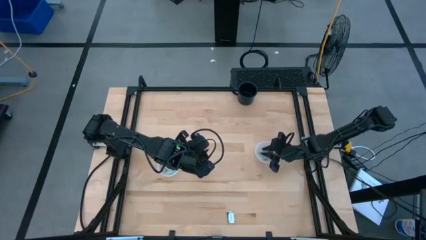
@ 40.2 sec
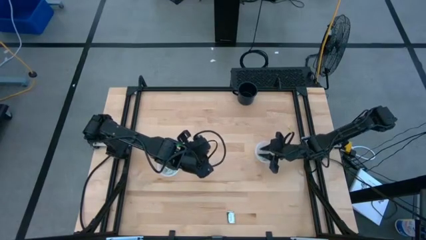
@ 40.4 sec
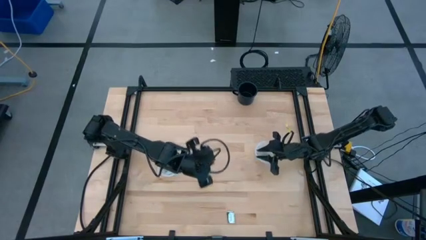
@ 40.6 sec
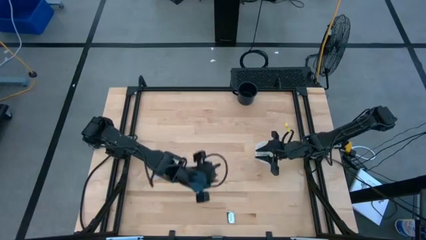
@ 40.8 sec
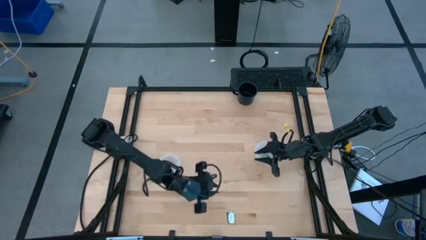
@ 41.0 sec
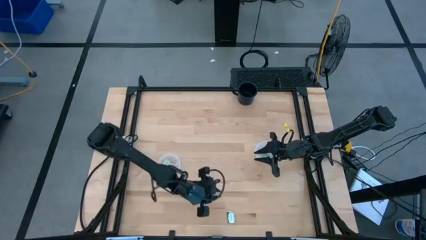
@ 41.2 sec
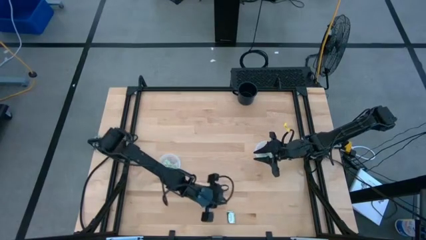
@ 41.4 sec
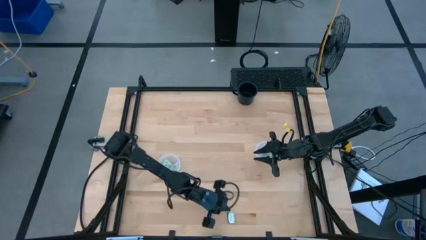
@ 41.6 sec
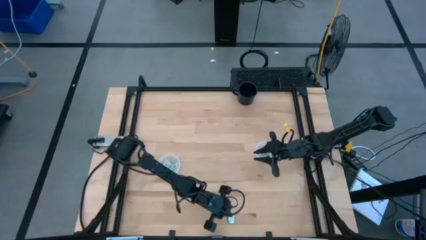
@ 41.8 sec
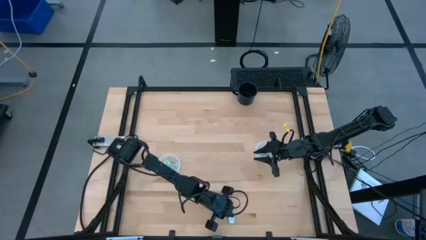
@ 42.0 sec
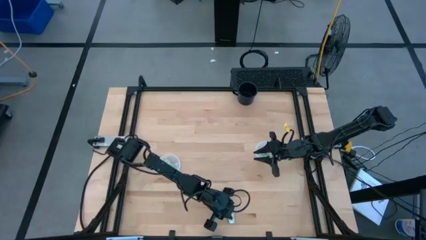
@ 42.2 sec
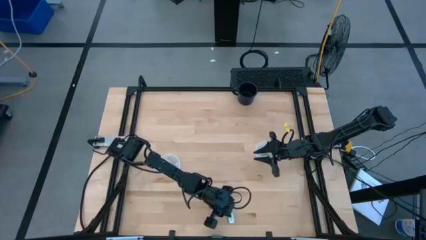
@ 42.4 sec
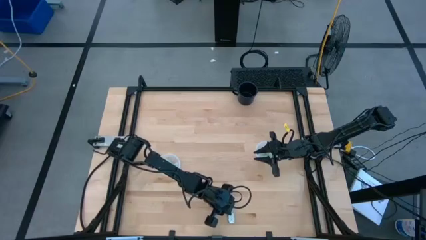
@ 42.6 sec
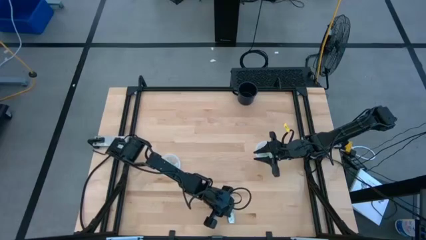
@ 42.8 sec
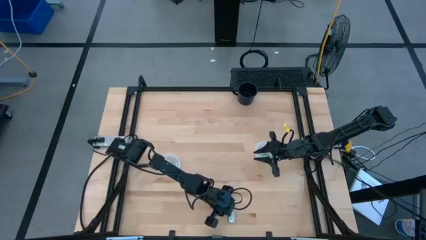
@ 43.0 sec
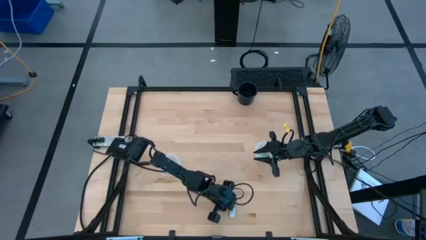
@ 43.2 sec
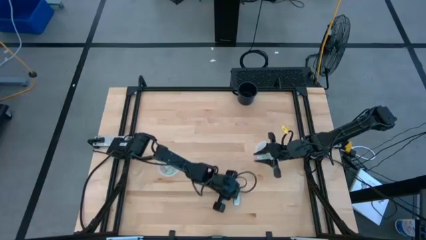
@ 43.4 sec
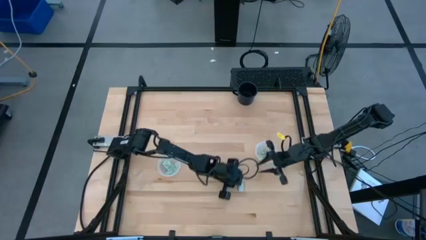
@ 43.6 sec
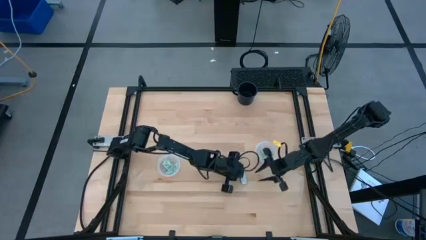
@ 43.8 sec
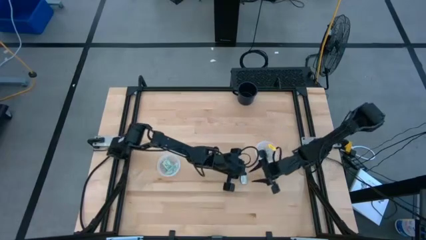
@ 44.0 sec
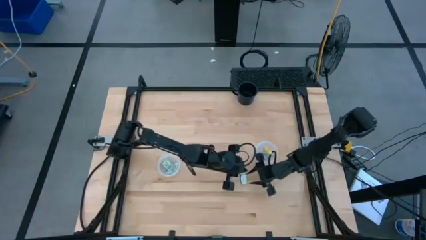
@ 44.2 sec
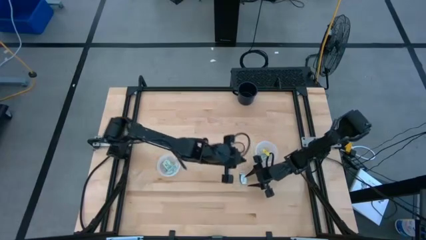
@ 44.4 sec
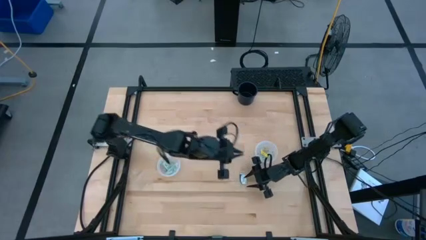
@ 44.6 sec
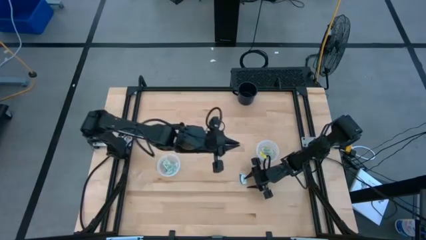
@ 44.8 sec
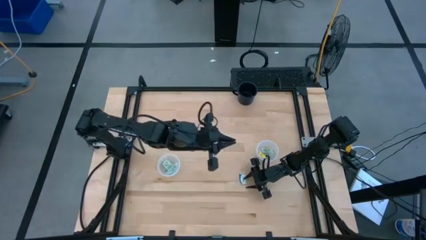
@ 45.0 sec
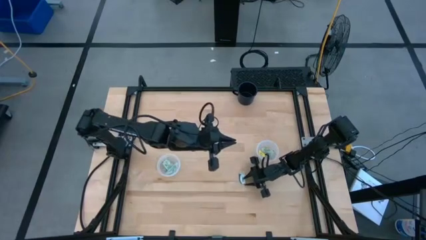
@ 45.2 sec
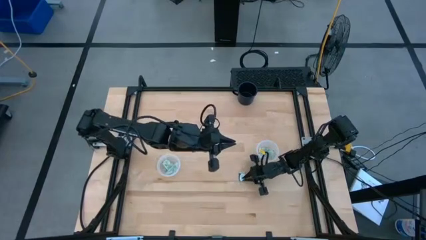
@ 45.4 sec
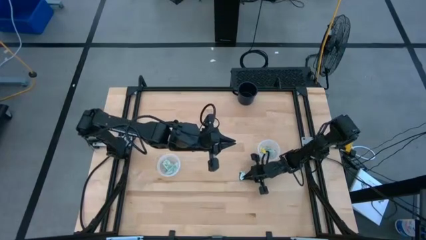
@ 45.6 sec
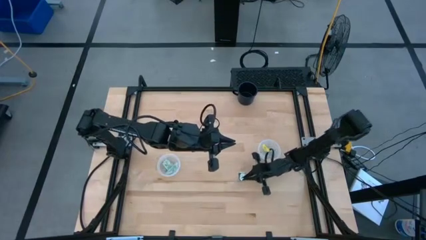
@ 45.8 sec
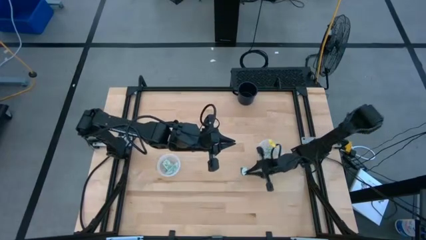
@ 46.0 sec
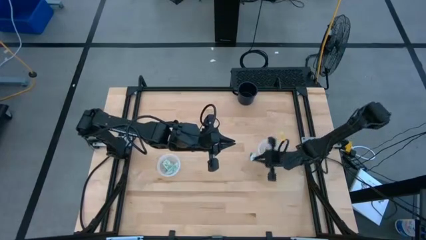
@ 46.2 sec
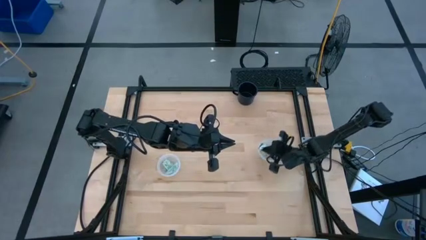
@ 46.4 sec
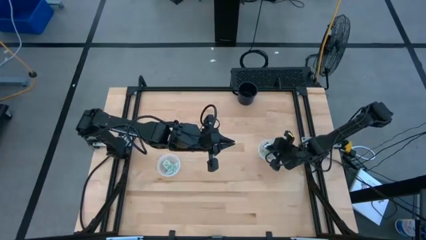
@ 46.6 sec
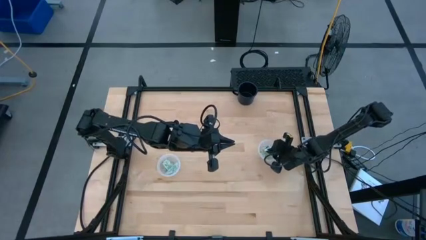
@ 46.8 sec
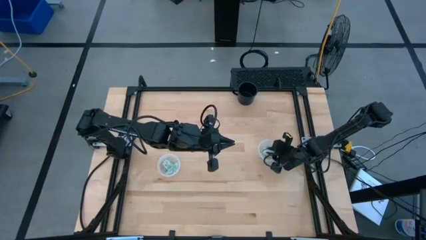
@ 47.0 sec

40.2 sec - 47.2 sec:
Task: Pick and place items into bin
Put the stevia packet into the right transparent bin

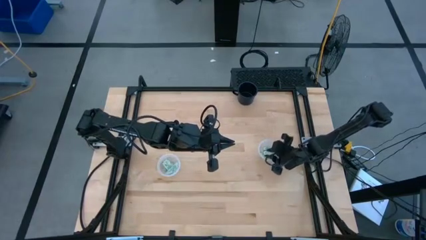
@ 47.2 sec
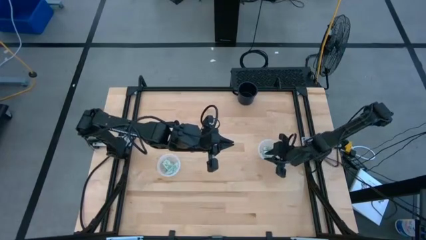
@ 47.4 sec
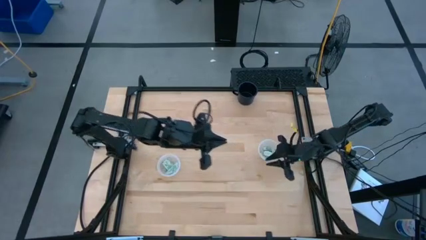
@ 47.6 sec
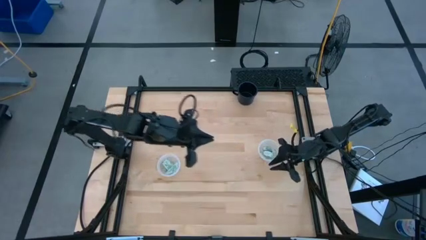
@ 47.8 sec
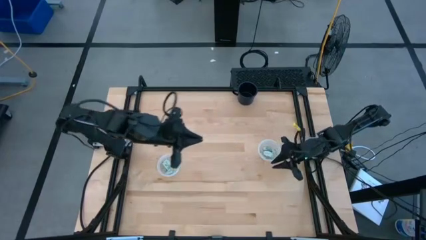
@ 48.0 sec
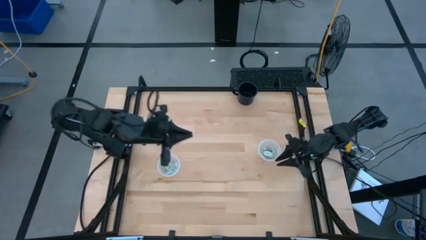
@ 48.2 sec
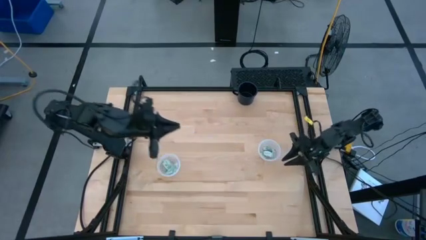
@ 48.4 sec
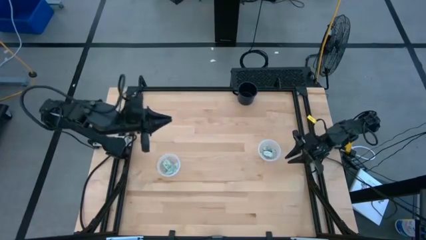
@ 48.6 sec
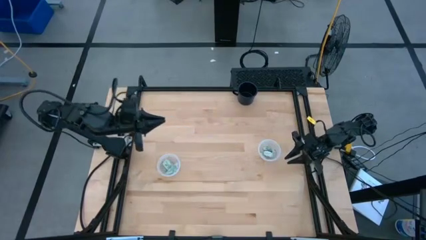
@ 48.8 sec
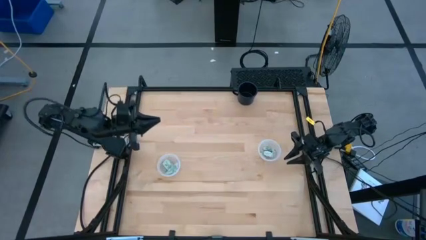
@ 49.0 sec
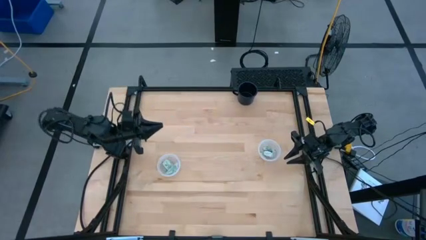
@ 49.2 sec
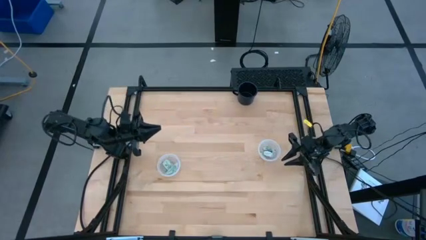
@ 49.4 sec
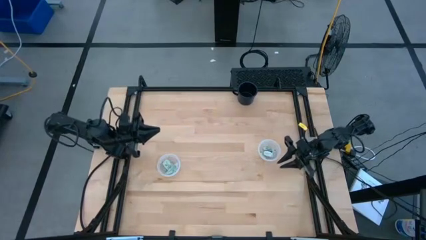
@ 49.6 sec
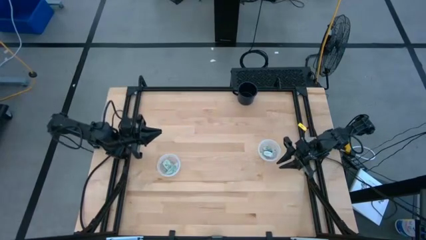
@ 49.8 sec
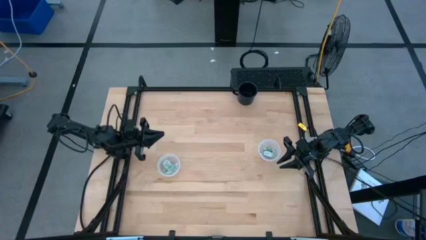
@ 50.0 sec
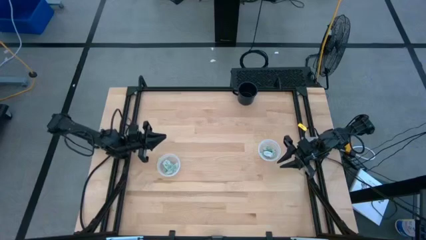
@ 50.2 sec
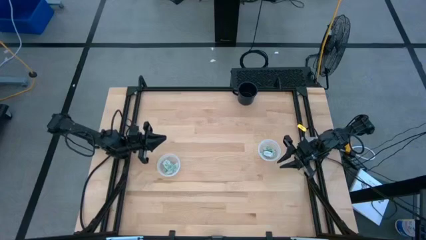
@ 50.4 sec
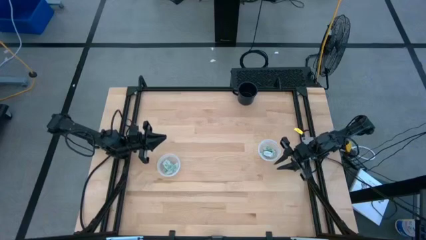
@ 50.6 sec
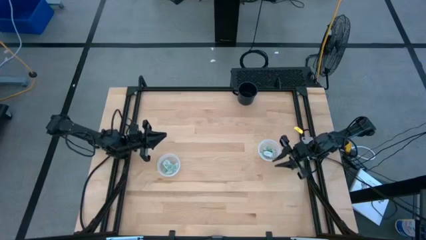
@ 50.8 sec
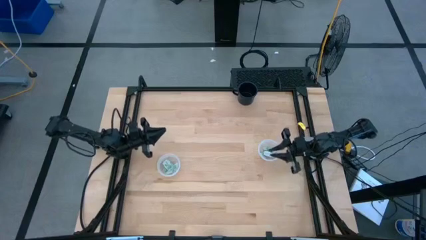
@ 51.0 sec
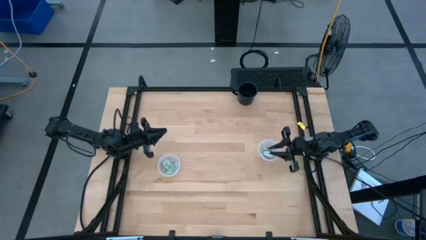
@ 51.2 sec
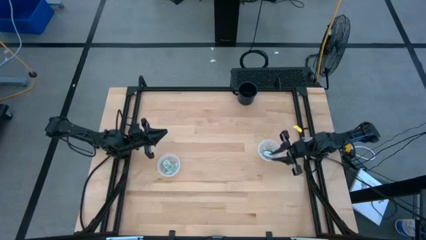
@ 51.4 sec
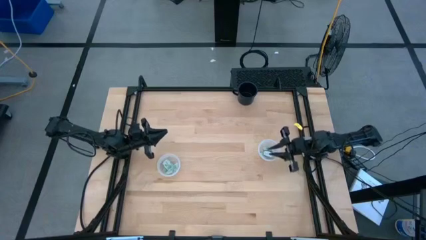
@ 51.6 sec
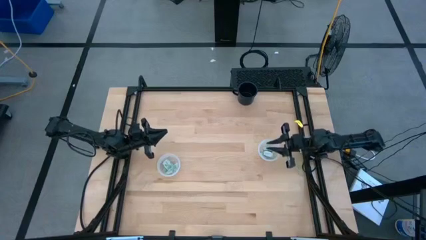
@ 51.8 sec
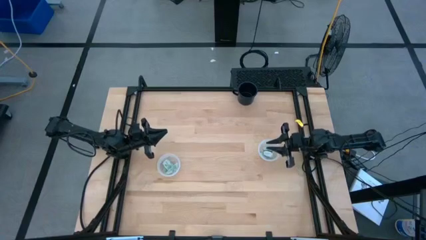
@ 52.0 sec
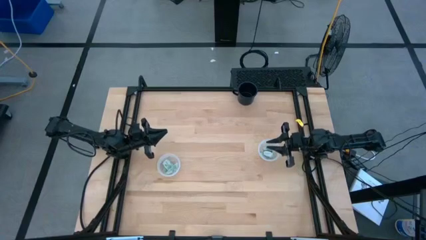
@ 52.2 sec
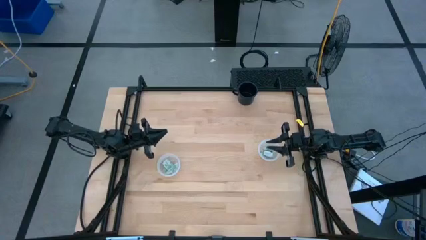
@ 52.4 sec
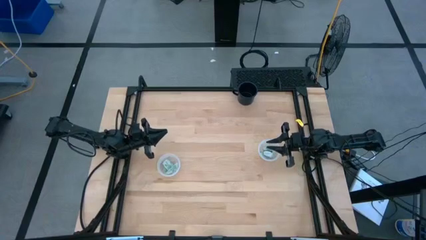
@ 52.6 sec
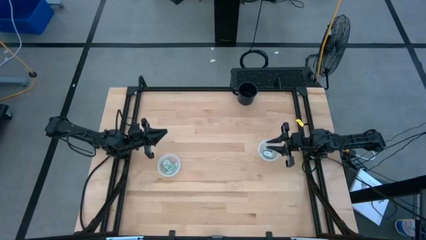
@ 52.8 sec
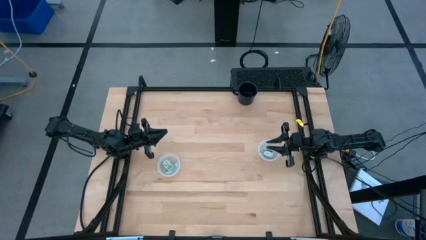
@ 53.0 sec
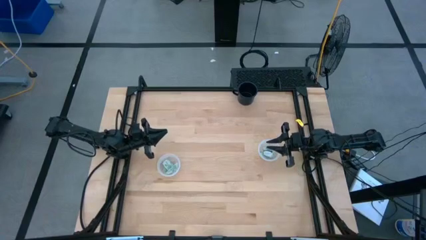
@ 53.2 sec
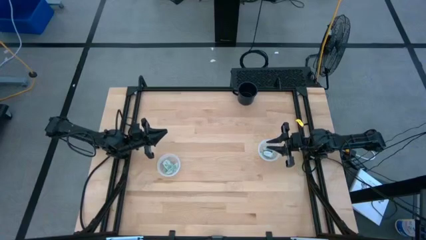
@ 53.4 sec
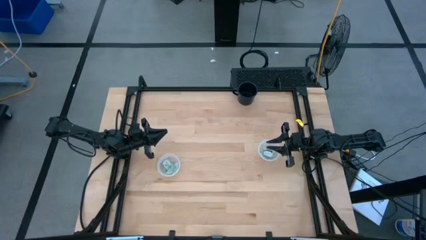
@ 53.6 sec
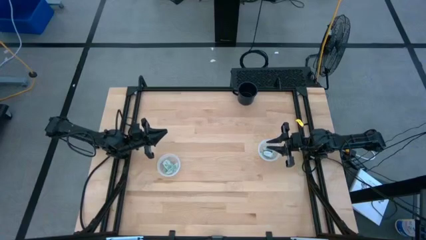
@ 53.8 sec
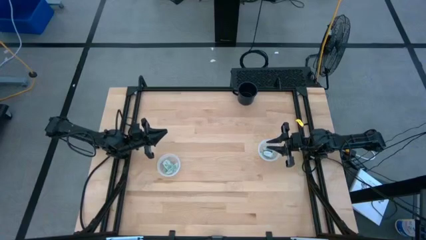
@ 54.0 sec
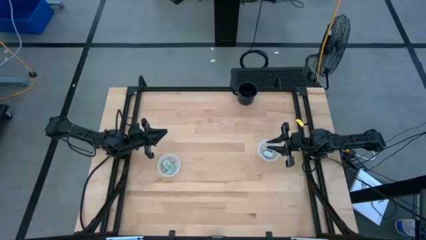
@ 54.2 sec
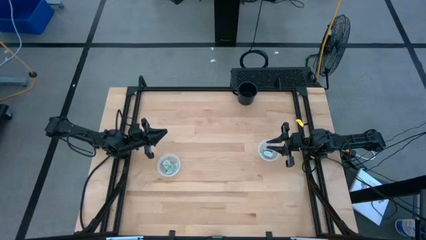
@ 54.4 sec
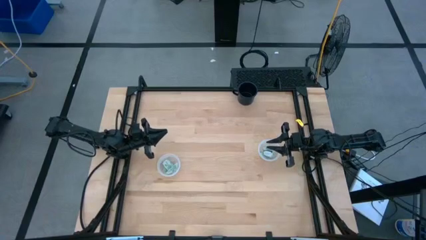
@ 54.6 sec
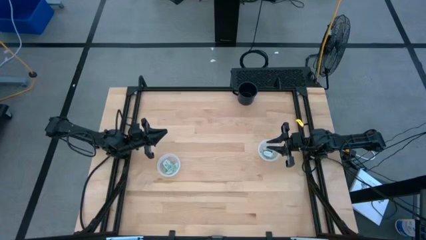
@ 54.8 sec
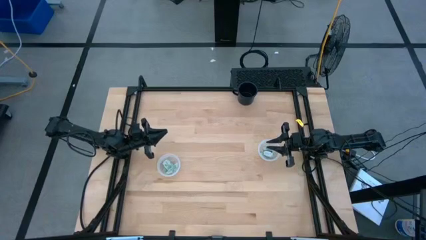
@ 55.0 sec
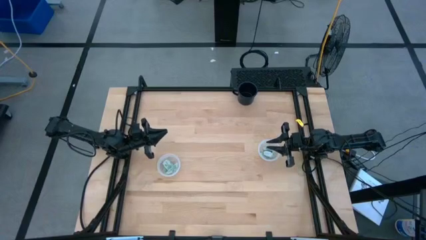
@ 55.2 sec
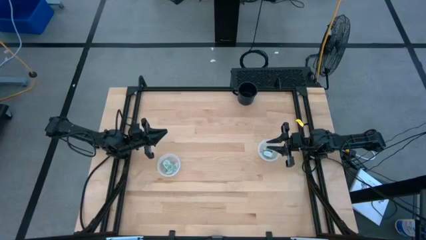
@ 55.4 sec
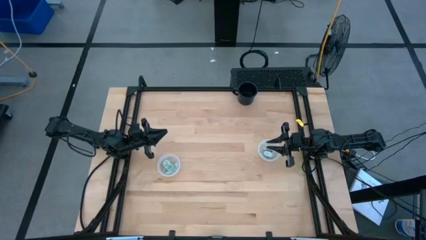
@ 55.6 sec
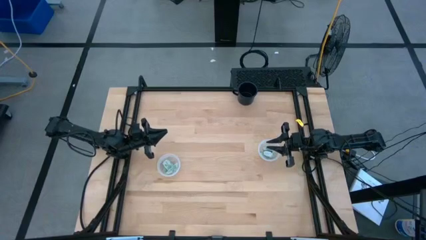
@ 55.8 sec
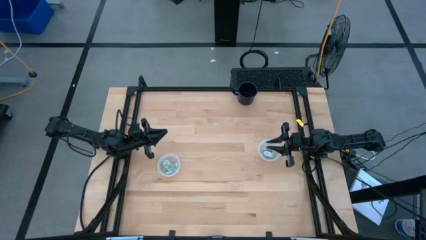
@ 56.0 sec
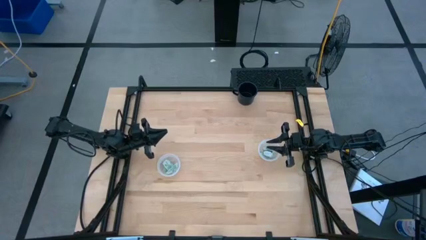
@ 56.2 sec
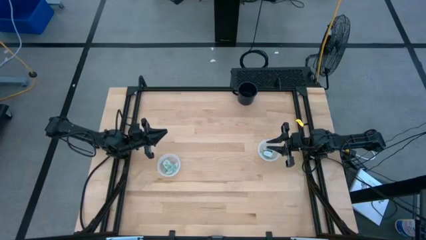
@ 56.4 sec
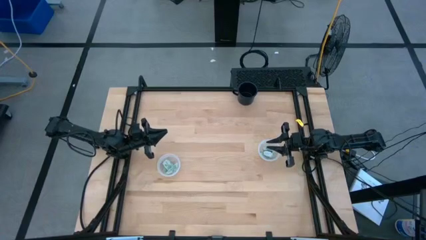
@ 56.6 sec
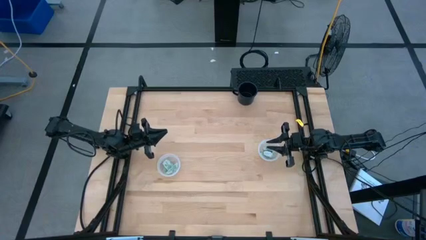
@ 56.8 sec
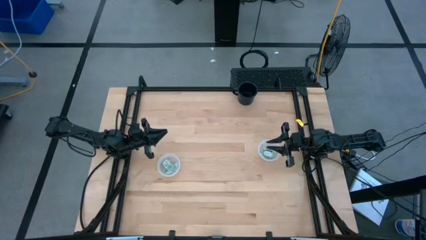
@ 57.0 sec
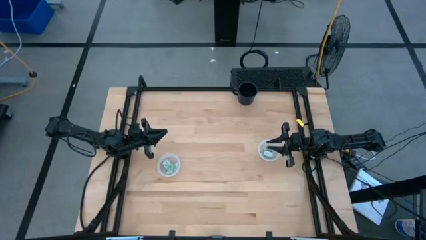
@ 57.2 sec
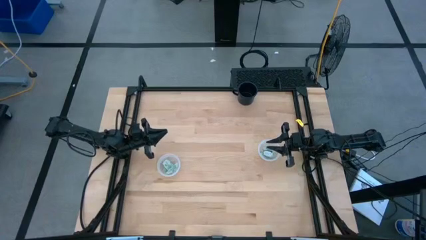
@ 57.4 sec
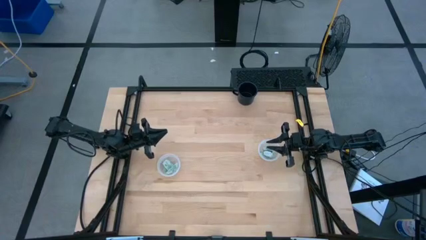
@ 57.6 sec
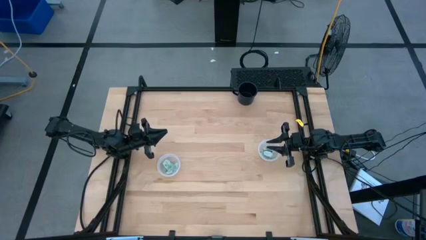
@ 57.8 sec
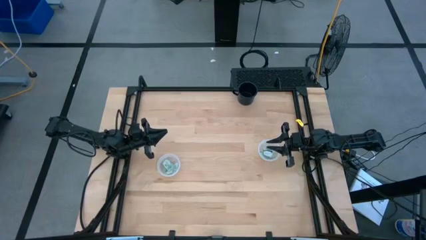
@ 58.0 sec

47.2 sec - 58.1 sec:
Return to Home Position
